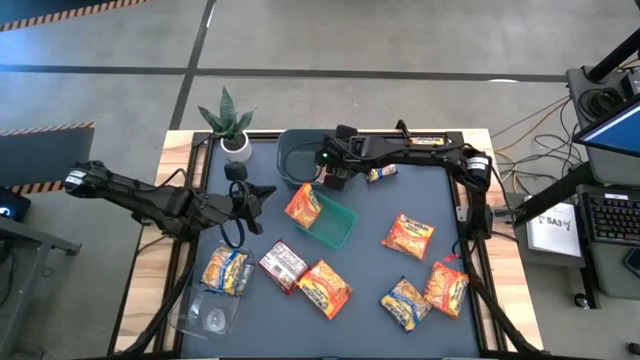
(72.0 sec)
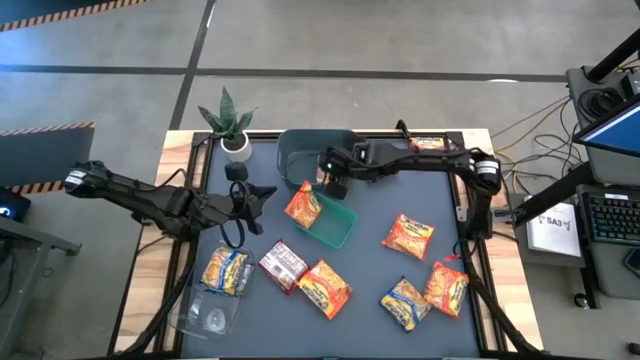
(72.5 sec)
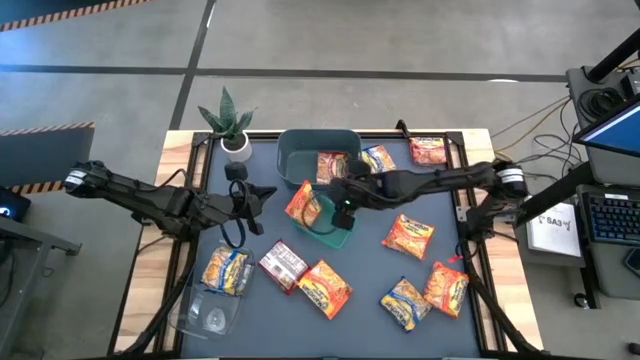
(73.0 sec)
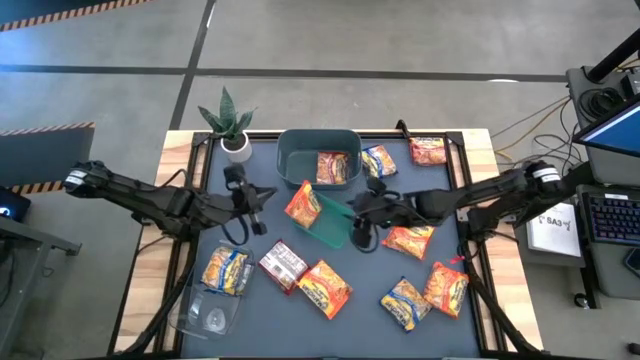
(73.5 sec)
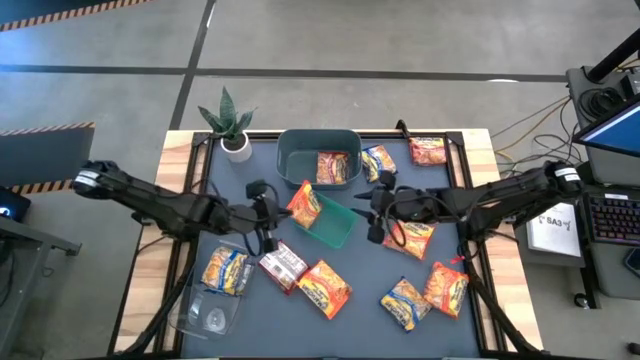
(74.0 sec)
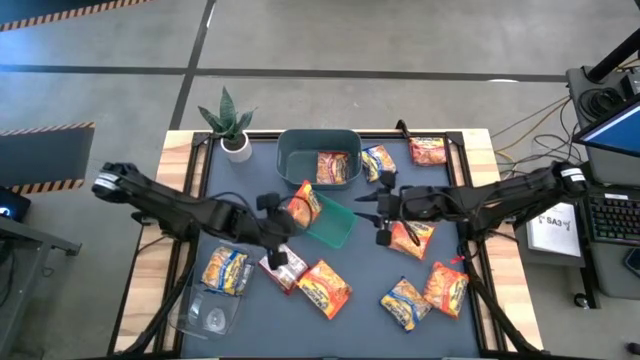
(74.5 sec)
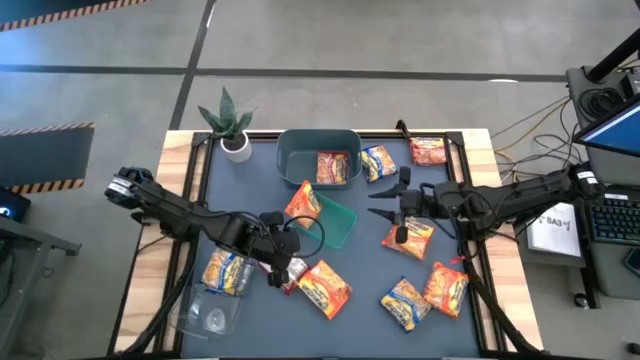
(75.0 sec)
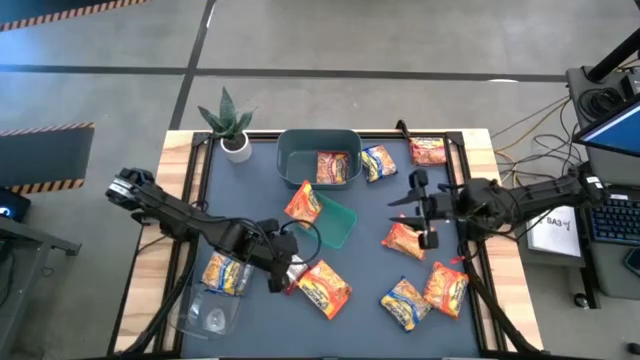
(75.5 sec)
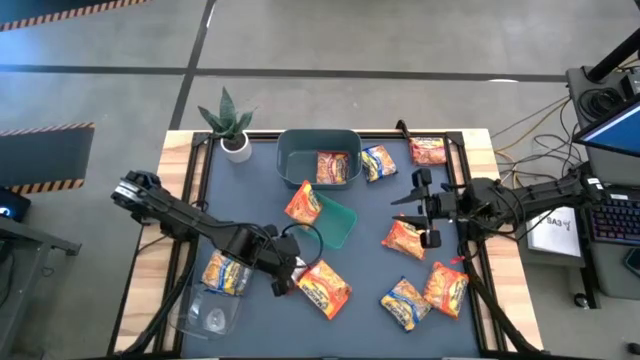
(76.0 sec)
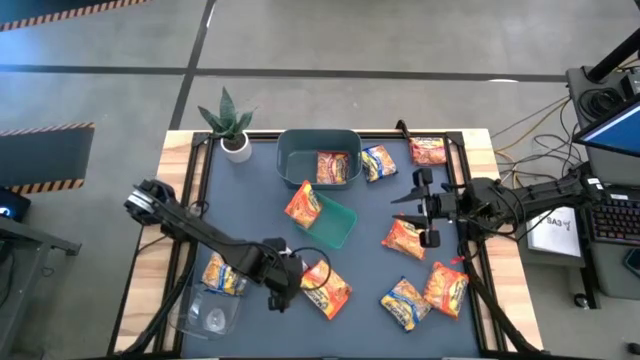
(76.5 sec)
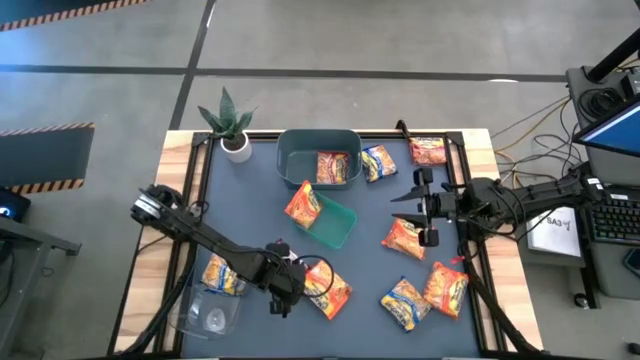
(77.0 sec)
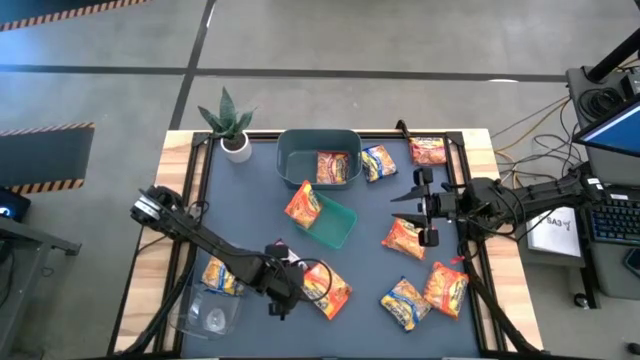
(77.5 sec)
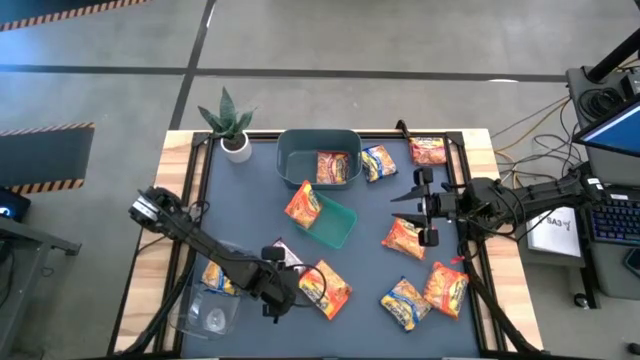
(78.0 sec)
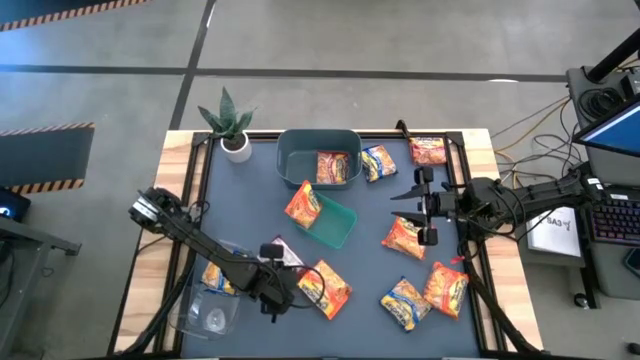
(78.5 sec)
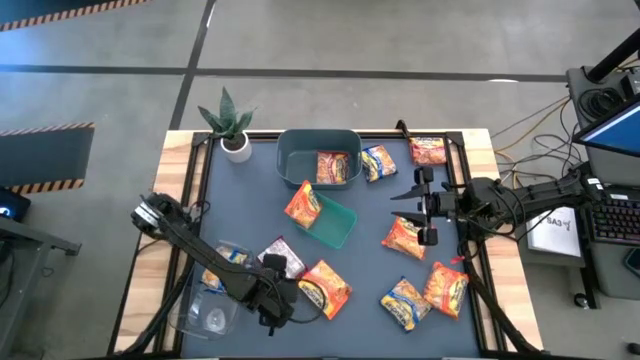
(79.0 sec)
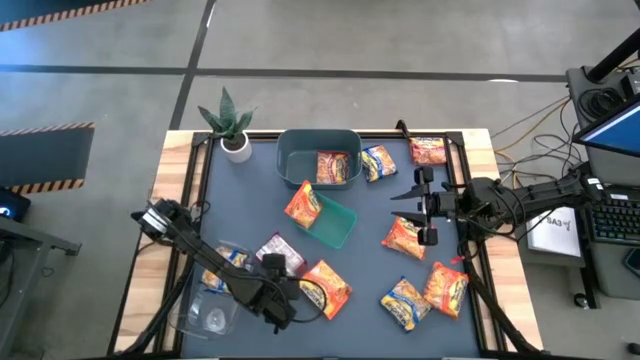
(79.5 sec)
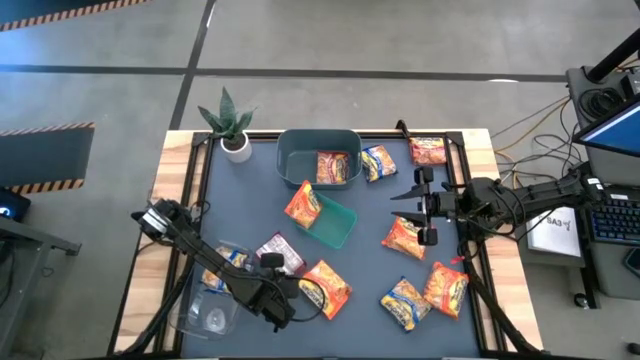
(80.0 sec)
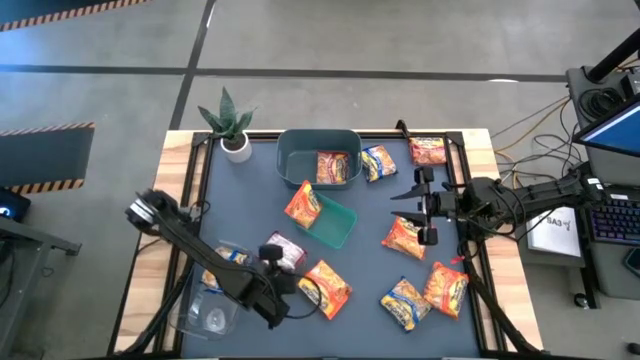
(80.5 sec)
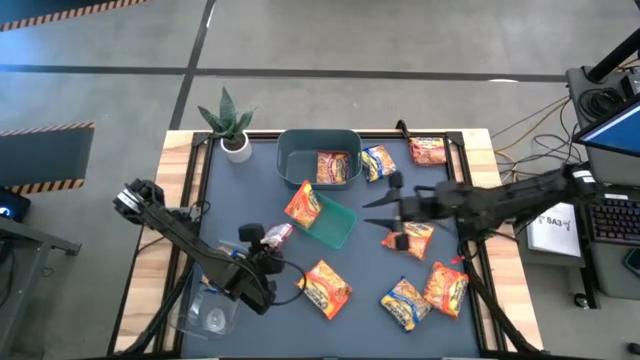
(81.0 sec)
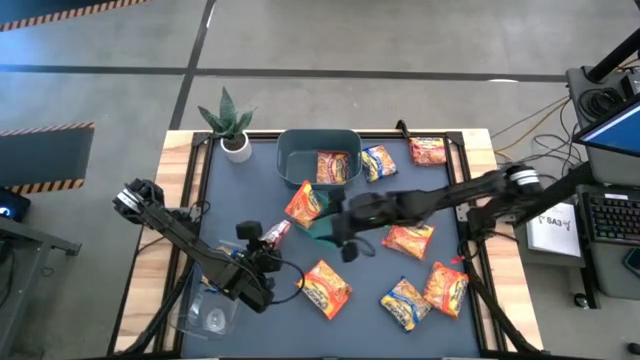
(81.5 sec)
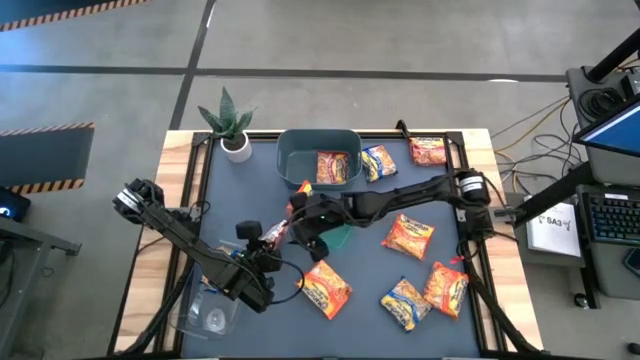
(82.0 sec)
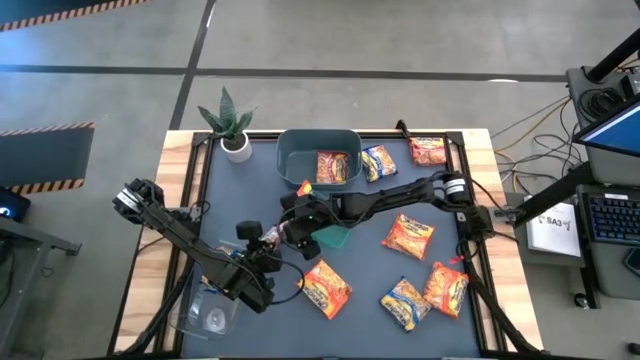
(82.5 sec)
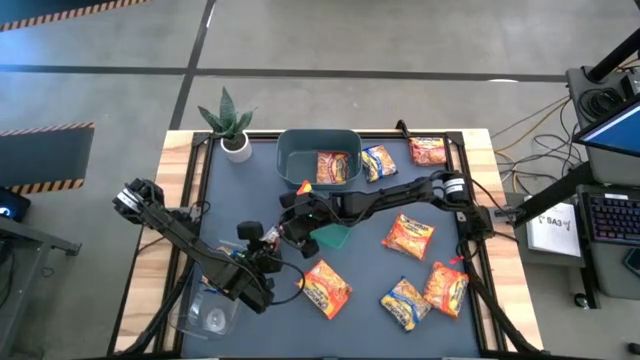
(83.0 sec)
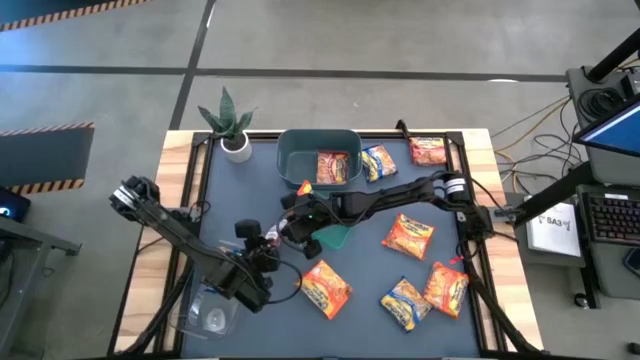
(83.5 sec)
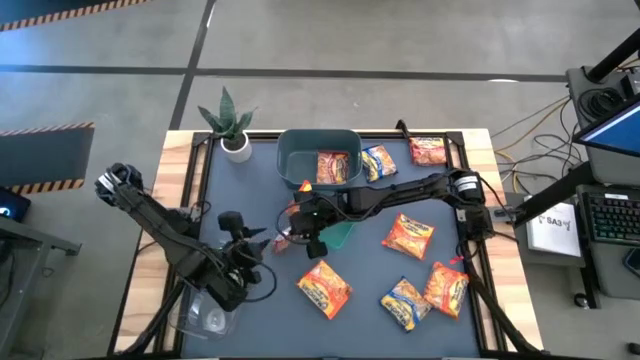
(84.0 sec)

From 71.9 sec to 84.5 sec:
Task: Sort Maruchan noodles
Put the red noodle pack into the blue bin

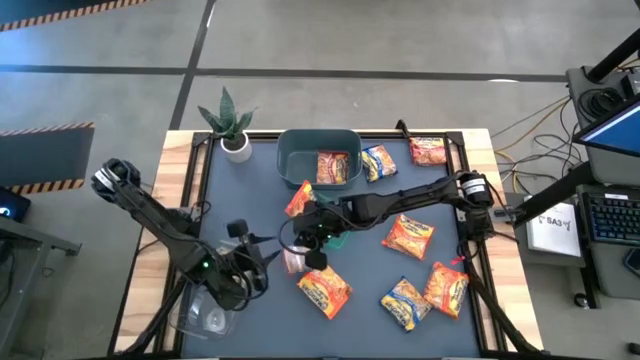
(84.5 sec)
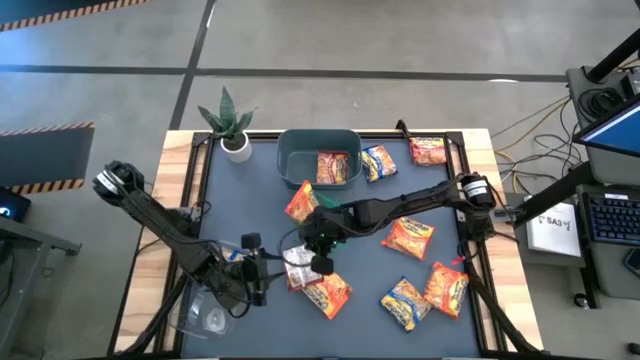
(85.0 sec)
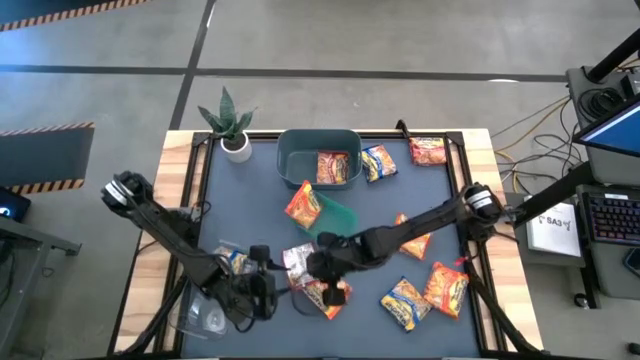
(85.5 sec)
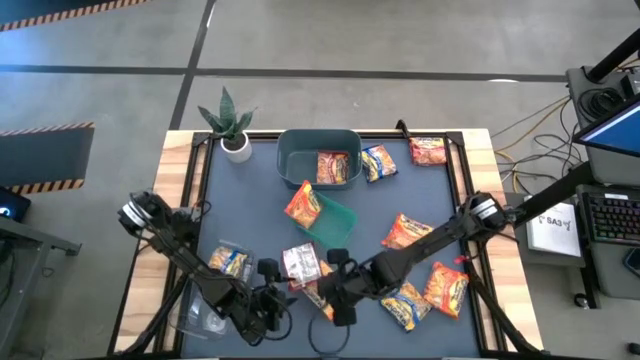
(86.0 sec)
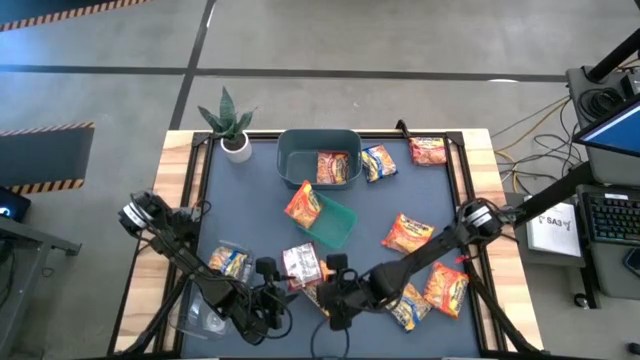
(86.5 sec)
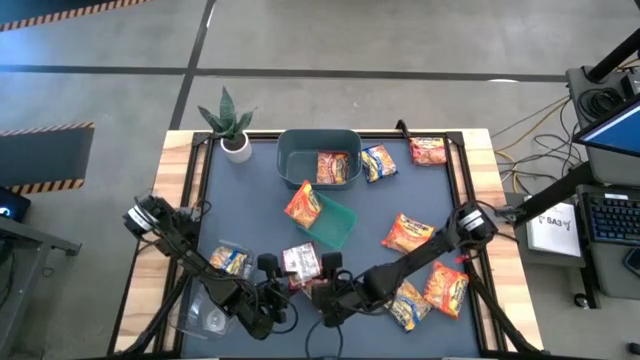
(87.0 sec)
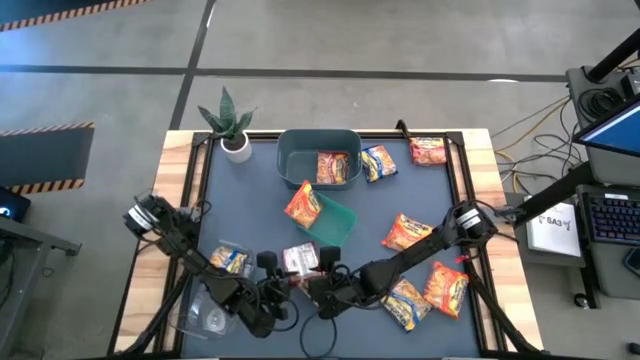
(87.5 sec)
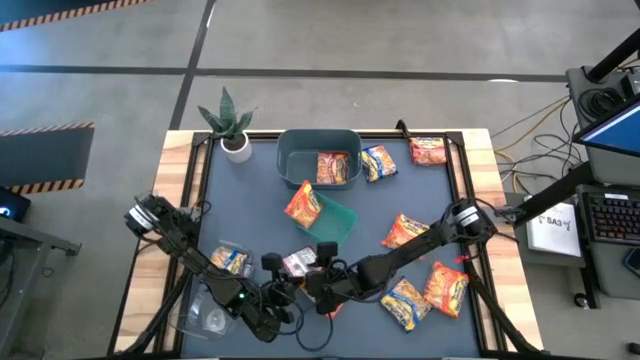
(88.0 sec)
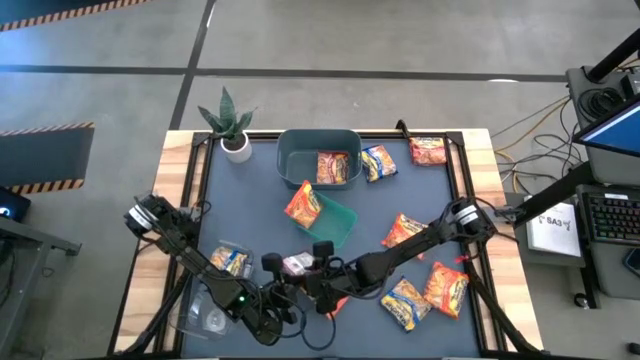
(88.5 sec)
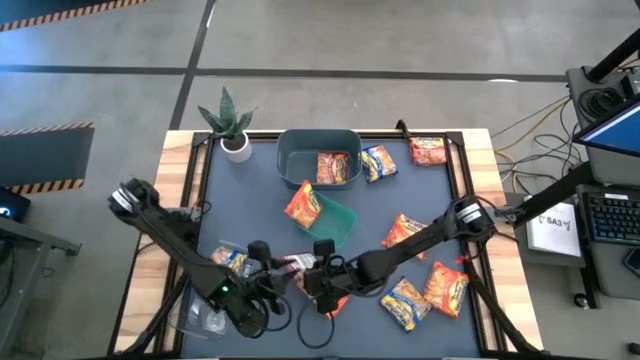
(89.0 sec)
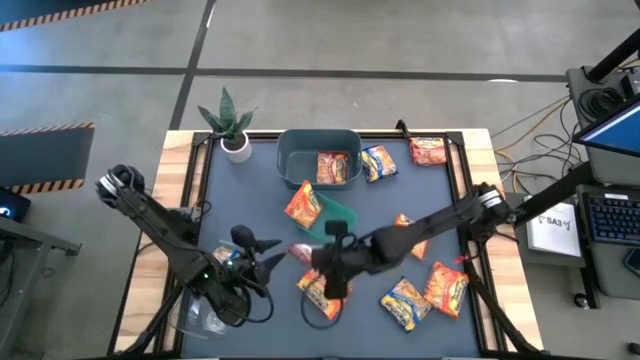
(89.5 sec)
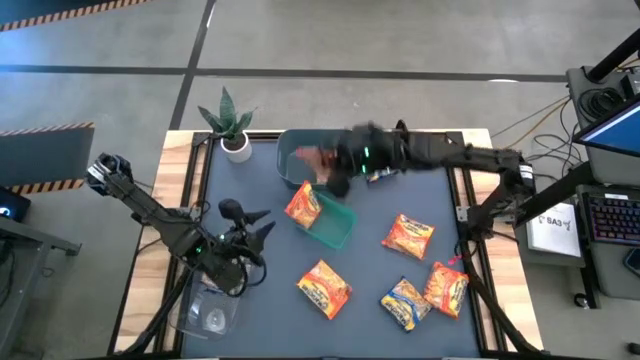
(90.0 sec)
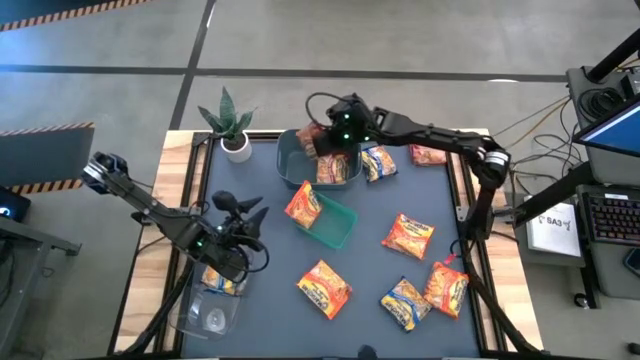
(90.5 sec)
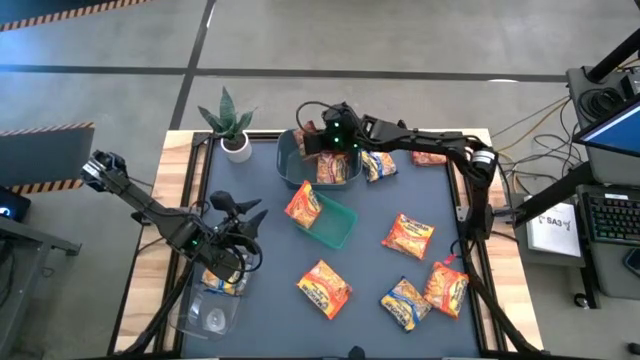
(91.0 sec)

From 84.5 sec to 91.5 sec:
Put the red noodle pack into the blue bin

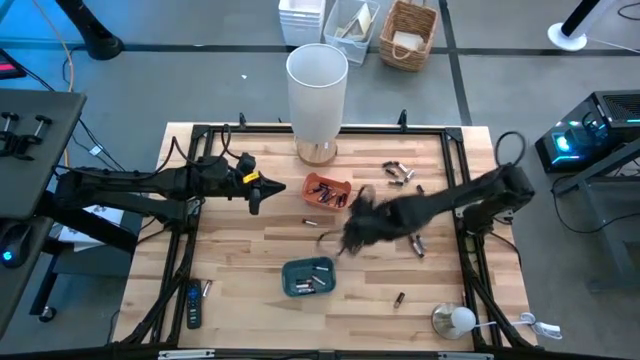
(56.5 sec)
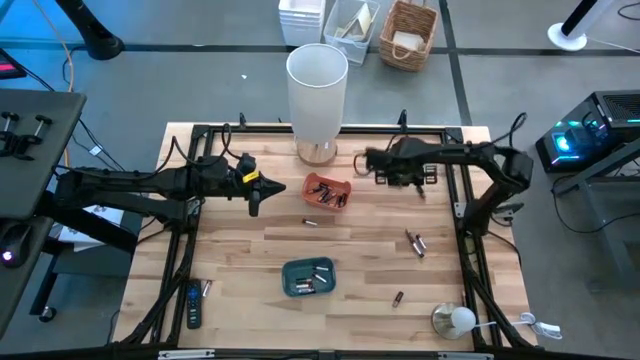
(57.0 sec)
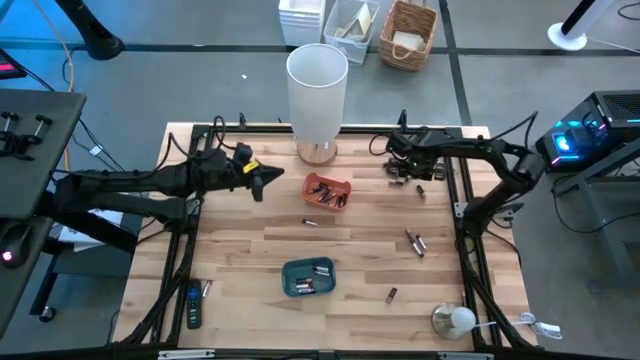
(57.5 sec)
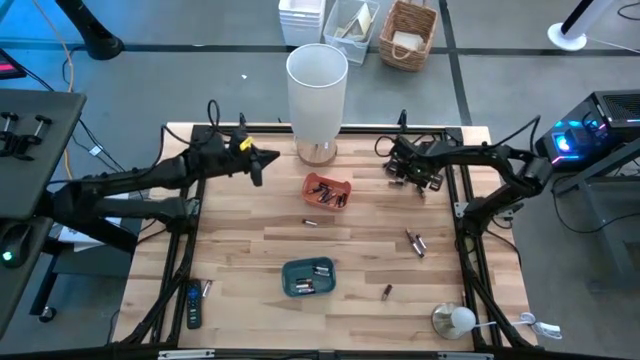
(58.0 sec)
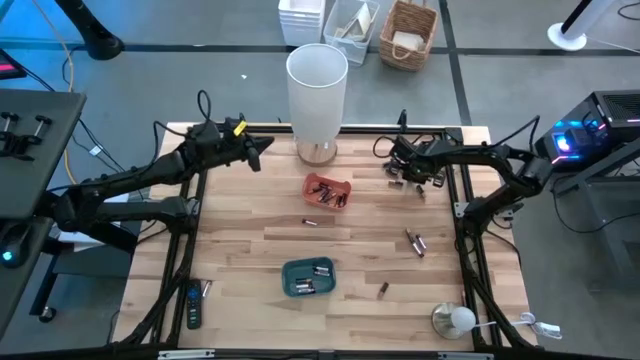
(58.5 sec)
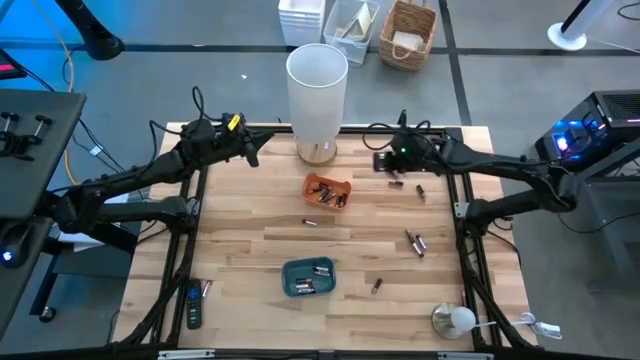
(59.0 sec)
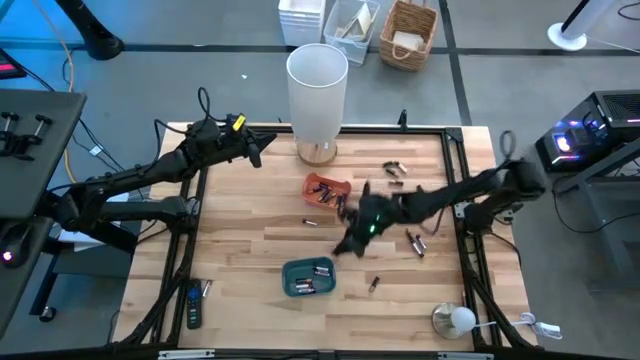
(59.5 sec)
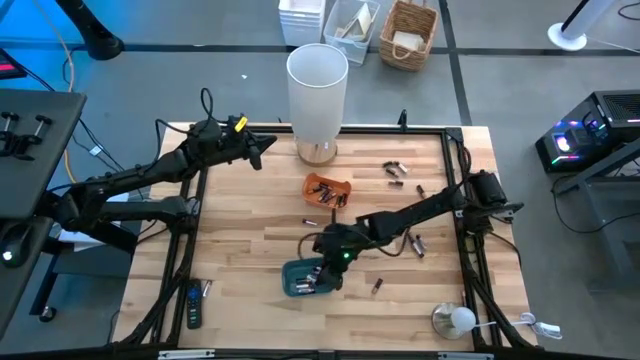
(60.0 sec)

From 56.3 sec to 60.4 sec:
Task: Sort batteries
Put the silver battery into the blue bin
